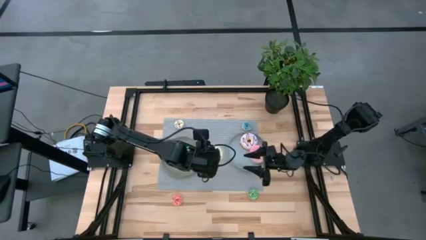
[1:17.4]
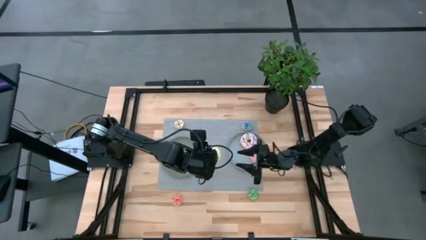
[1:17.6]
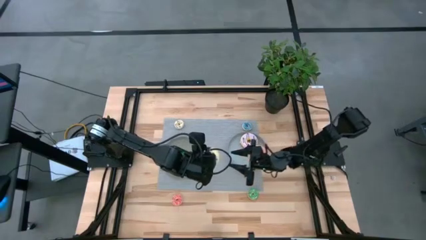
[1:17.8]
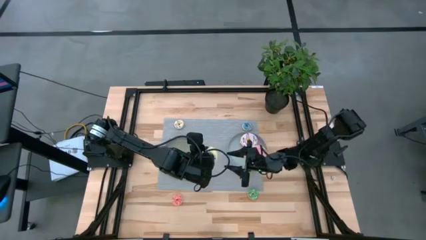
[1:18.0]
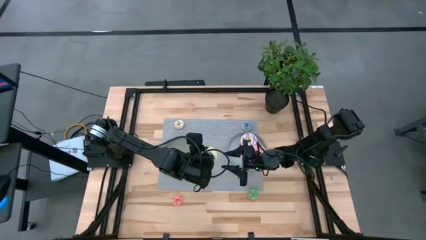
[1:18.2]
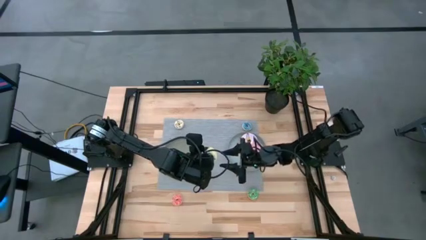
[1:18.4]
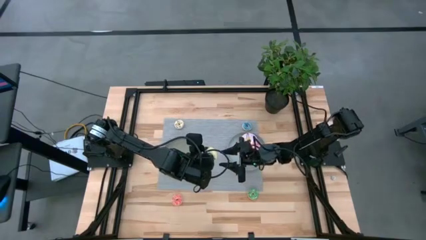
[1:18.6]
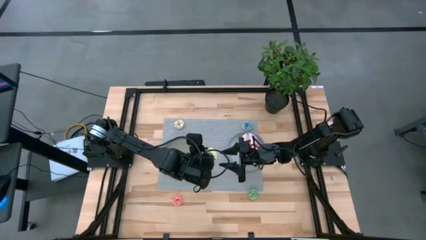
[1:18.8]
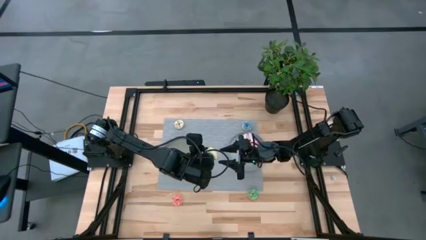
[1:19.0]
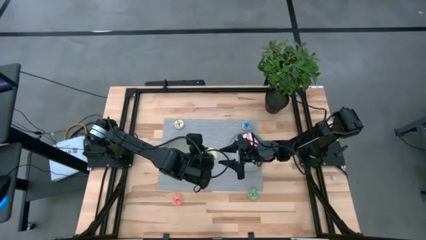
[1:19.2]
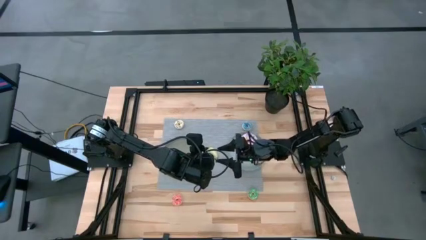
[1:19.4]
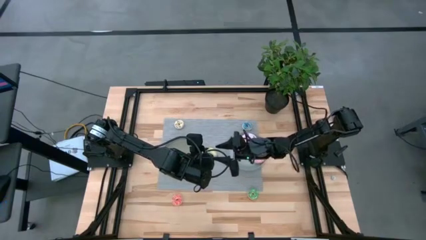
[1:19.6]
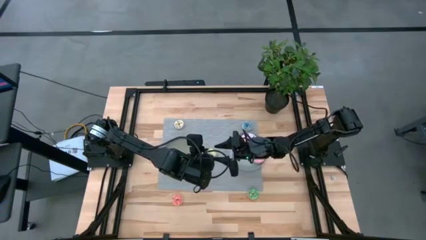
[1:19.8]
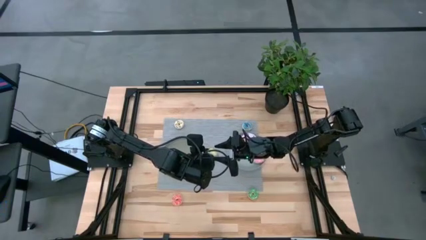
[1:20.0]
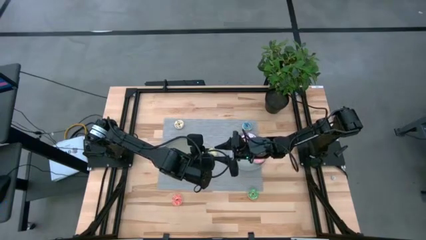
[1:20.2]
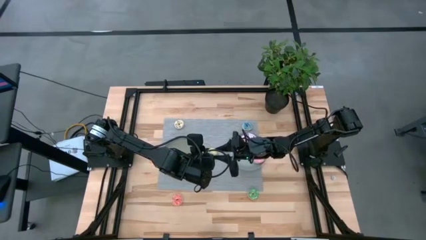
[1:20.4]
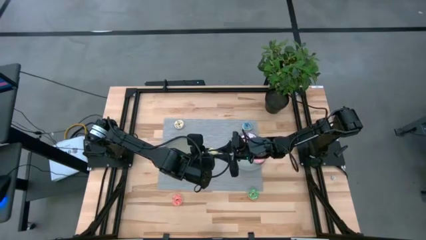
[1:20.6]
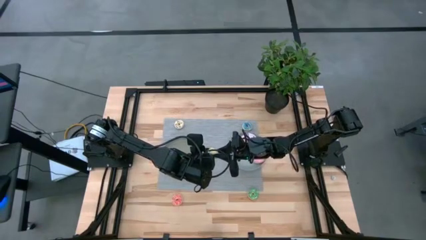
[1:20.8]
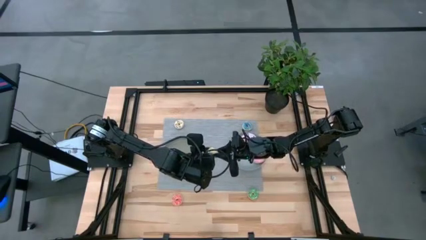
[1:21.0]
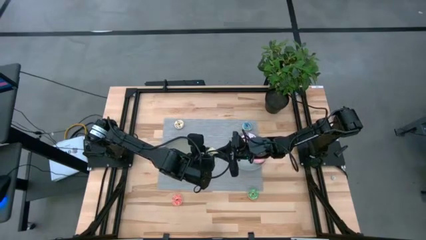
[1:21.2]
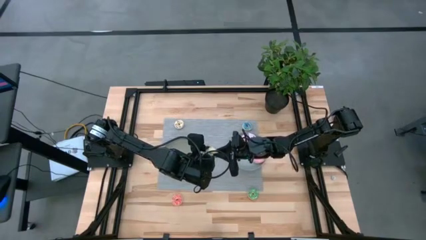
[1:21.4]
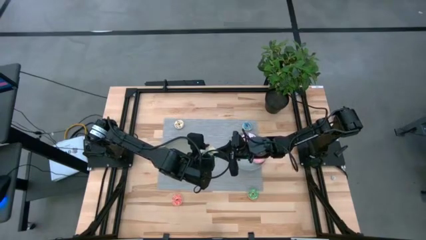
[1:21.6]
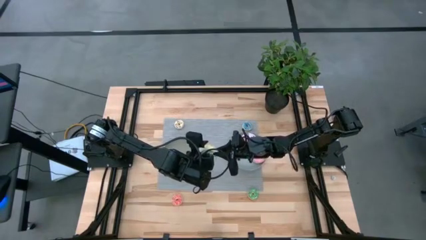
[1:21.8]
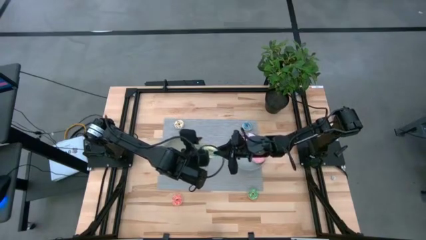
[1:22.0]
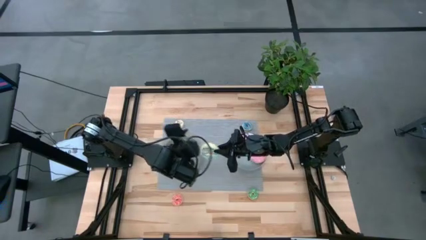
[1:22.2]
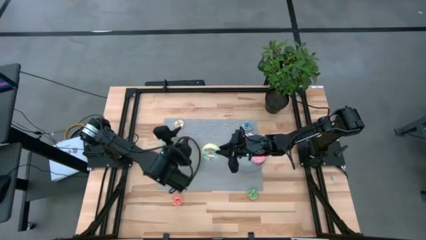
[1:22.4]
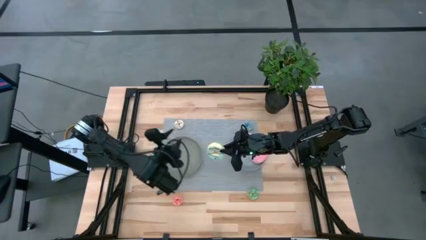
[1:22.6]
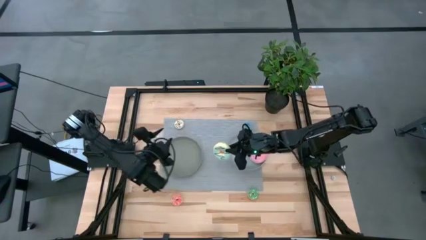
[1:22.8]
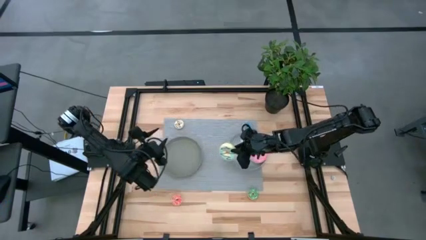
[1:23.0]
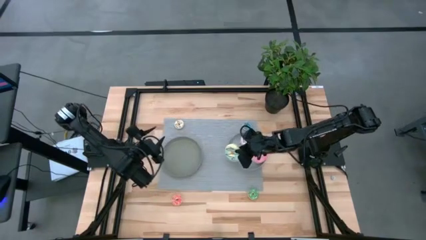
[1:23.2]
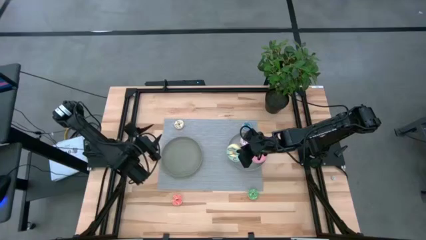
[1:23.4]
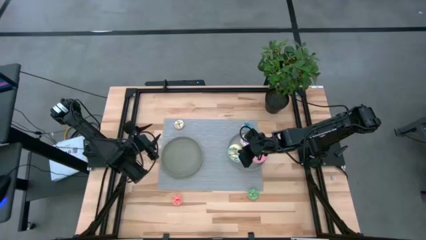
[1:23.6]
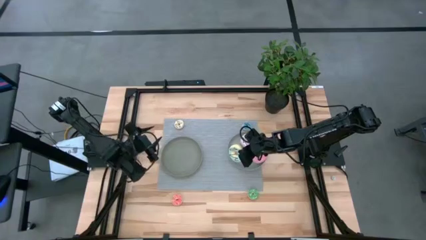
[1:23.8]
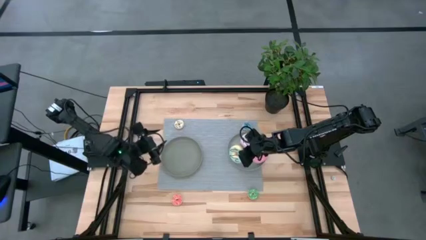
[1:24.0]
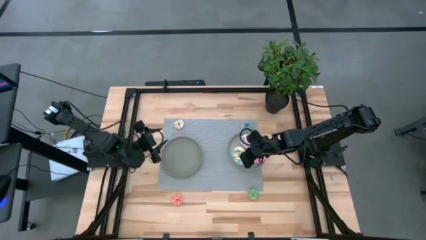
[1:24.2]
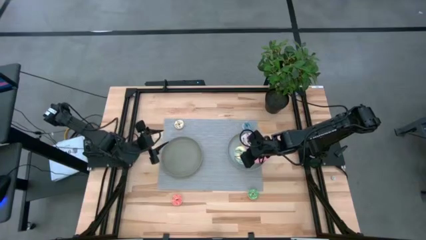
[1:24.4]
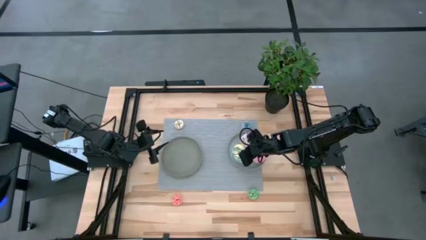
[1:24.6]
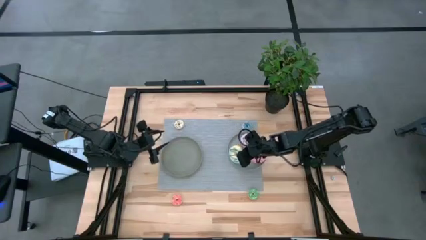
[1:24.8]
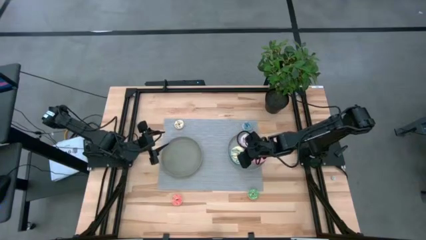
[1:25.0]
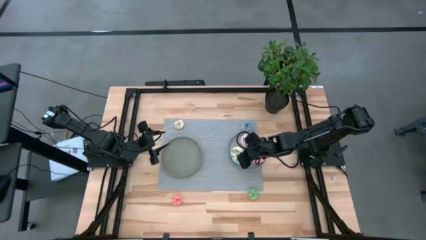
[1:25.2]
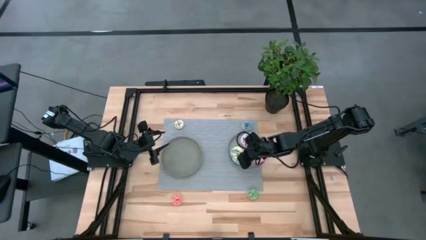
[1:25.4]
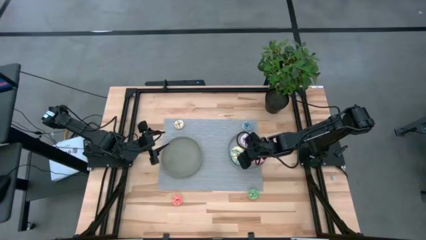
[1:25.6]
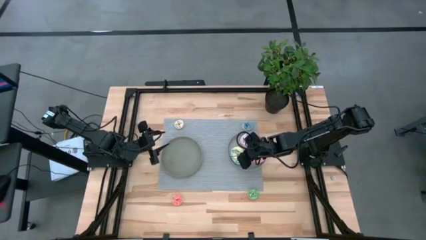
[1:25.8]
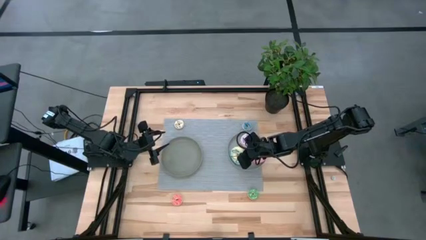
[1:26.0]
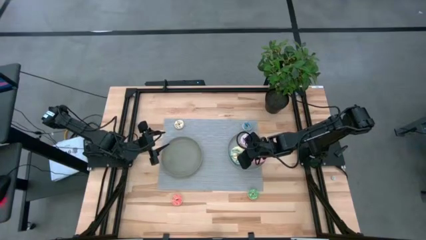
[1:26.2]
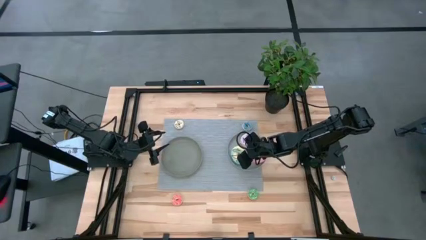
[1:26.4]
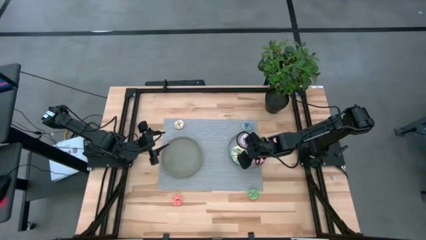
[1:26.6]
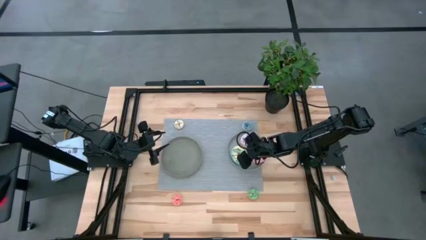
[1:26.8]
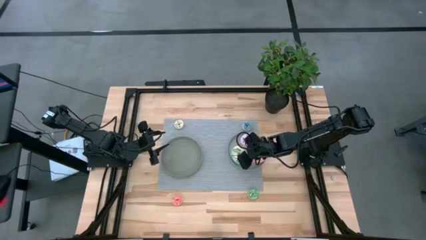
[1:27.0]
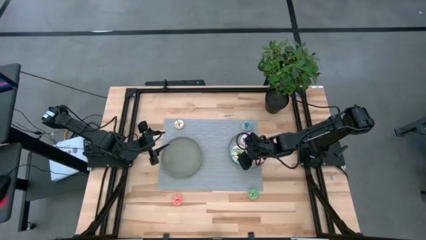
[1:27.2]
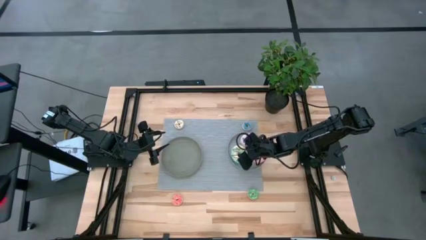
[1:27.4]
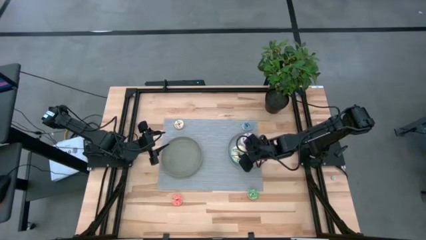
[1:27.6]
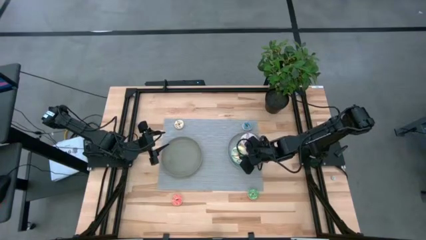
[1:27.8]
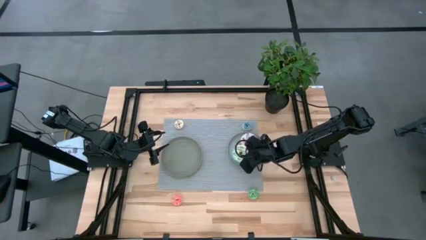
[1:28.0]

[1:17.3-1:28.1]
Task: Pick & Place donuts
Put the big light blue donut into the blue plate

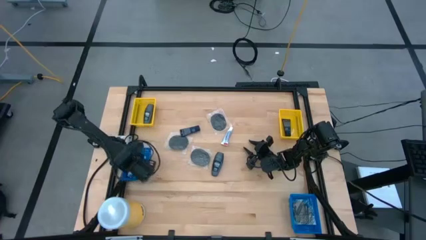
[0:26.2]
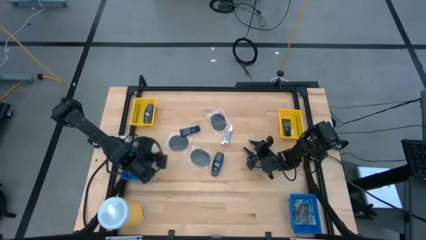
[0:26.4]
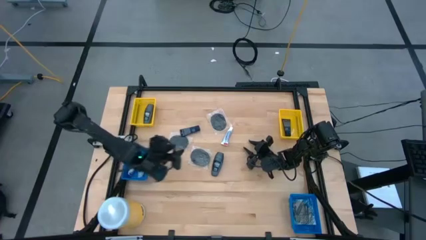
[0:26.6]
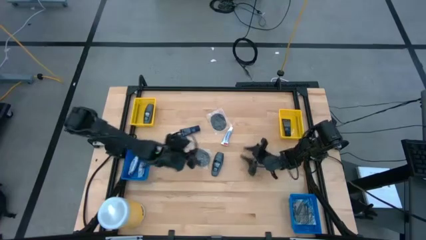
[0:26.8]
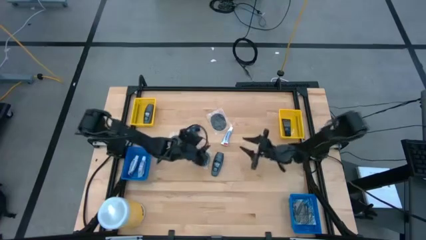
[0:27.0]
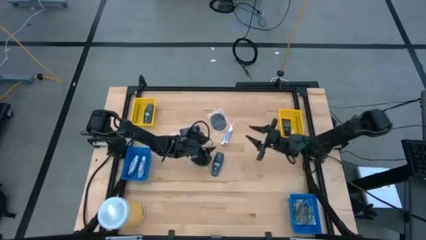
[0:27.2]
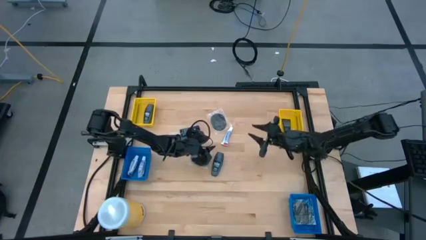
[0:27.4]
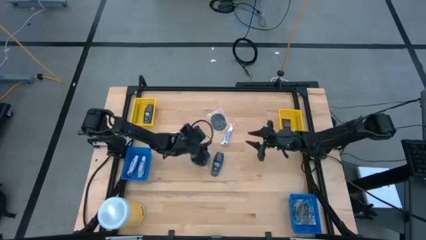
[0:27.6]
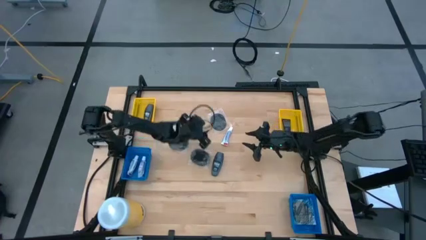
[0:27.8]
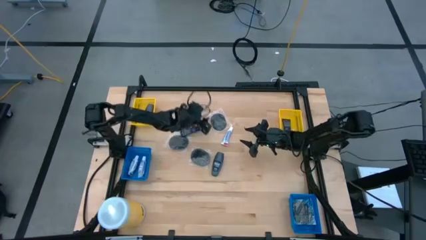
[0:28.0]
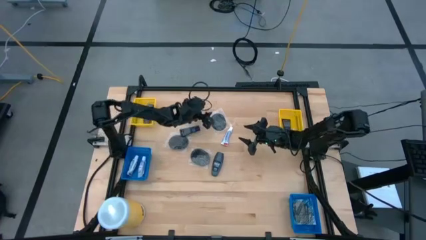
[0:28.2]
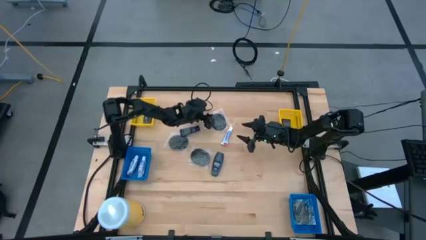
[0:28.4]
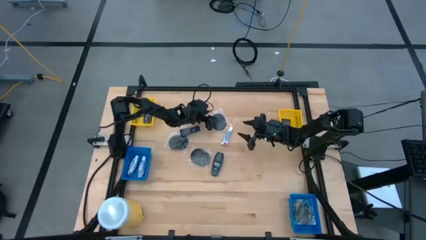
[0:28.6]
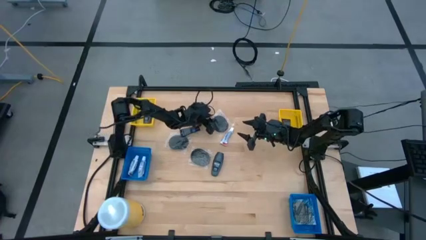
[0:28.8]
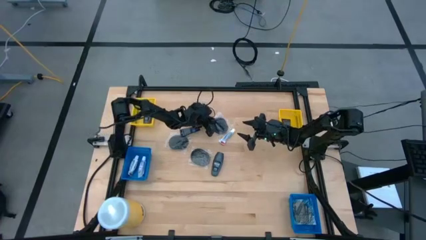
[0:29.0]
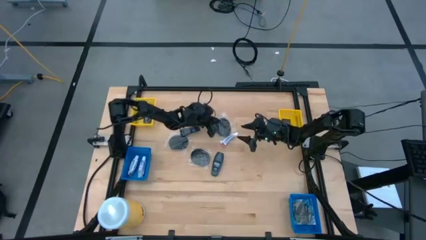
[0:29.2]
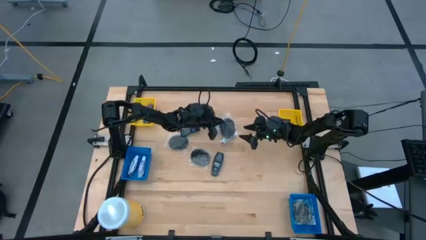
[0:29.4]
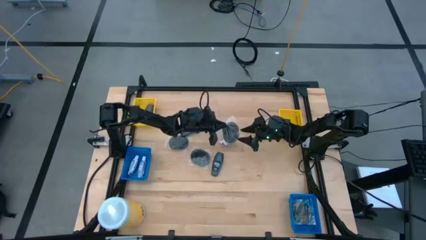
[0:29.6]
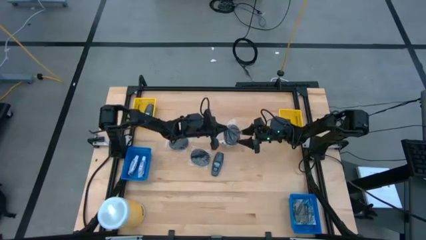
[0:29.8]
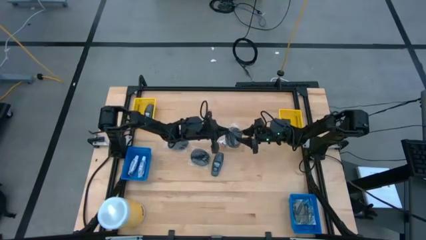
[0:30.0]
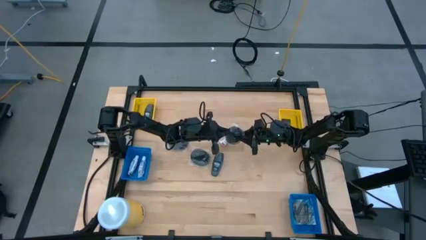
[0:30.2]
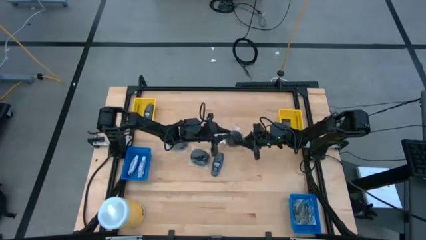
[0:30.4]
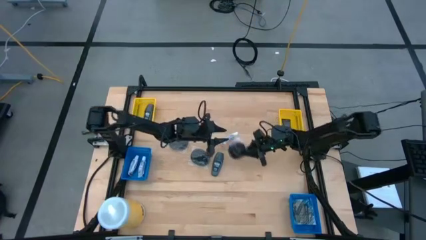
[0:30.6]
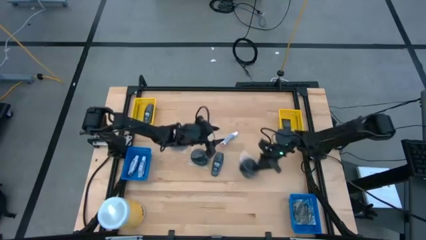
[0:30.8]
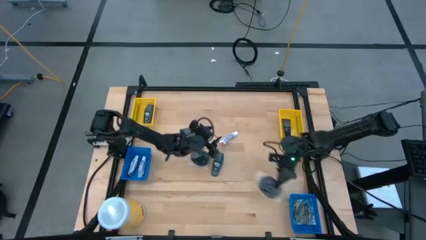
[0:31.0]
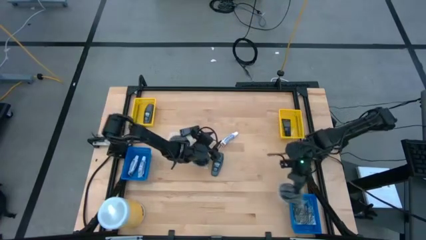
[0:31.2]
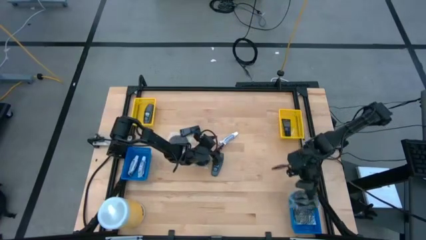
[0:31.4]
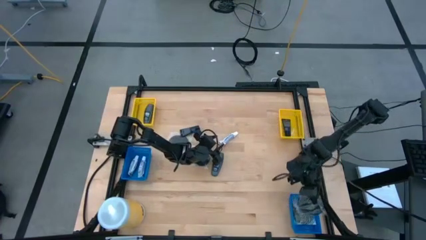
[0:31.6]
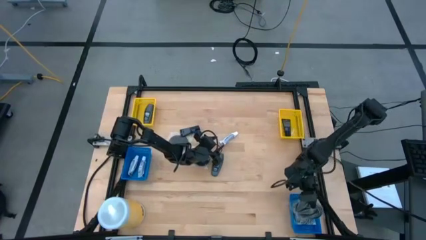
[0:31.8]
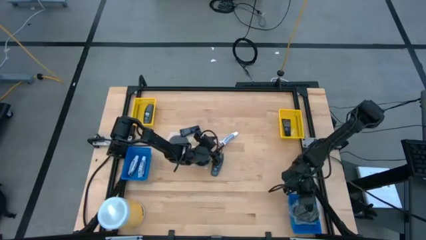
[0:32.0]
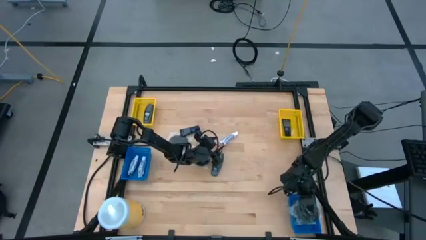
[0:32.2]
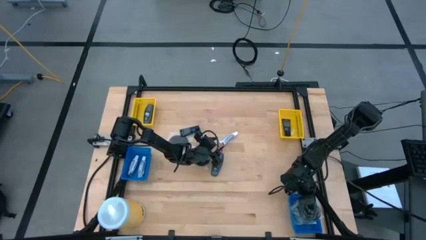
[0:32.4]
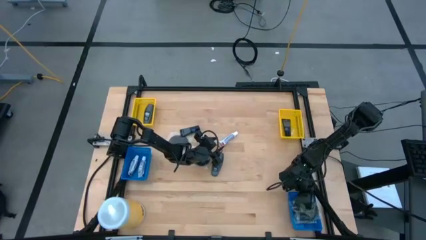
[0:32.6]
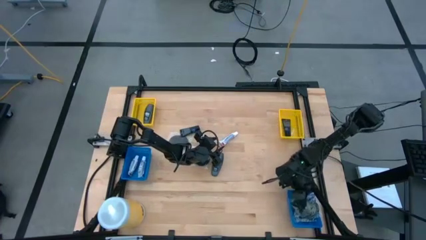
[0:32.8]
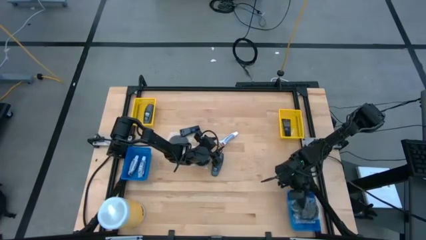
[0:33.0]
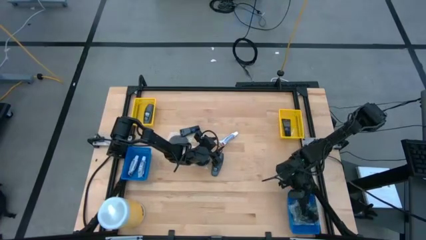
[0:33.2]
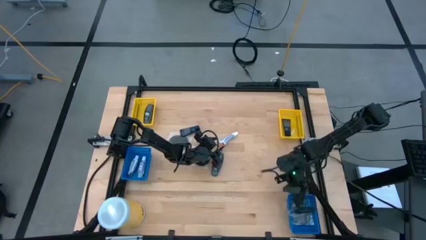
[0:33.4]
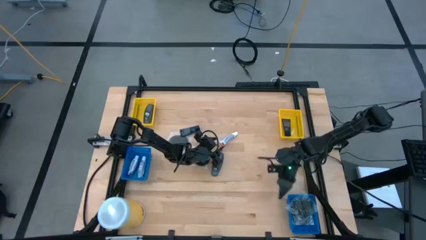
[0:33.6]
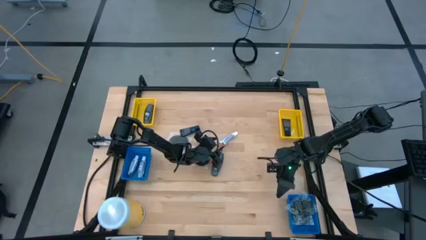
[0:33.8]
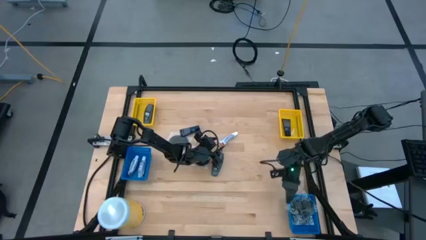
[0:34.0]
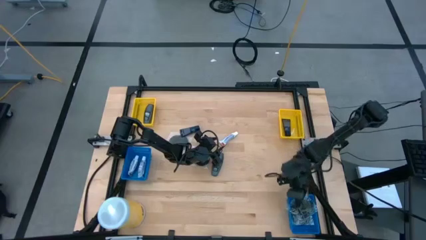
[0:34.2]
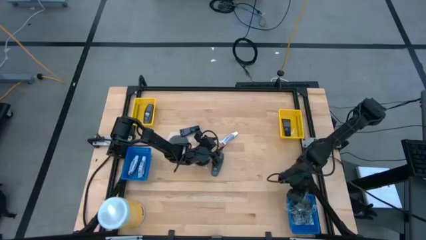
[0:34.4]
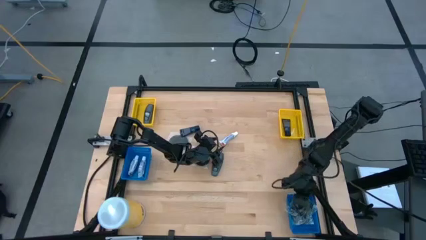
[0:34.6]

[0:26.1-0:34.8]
Task: Pick & Place Travel size toiletries
Put the black hairbrush into the right blue basket
